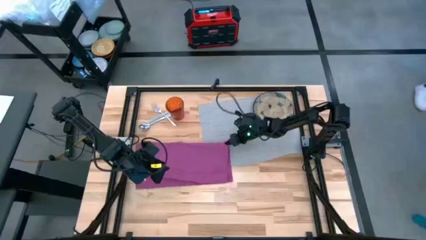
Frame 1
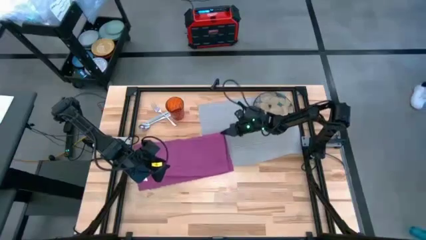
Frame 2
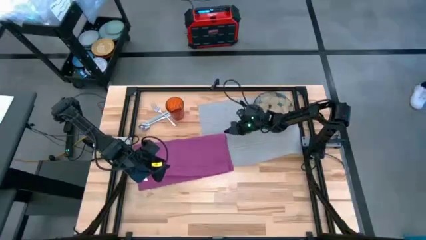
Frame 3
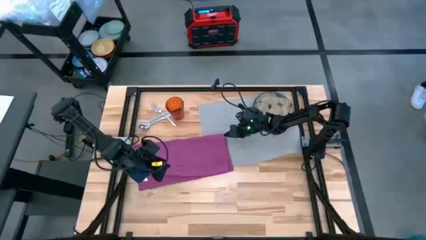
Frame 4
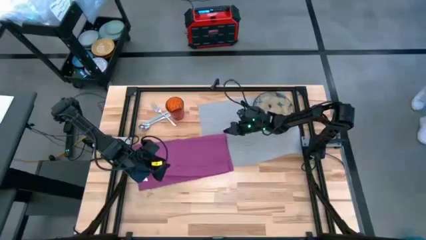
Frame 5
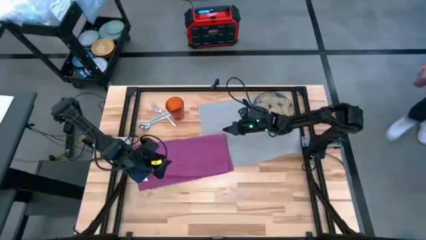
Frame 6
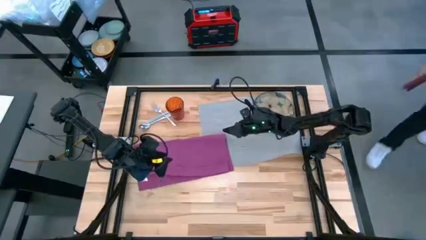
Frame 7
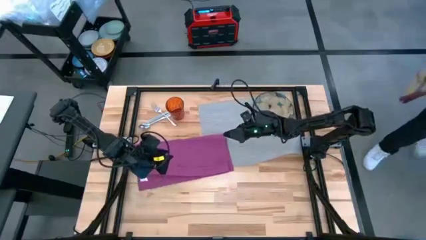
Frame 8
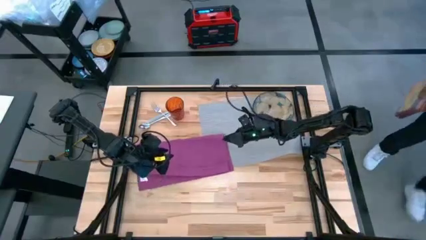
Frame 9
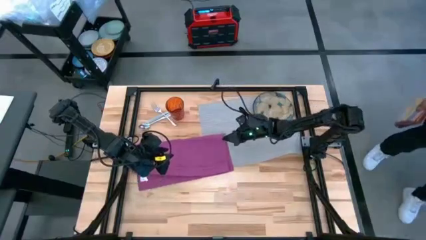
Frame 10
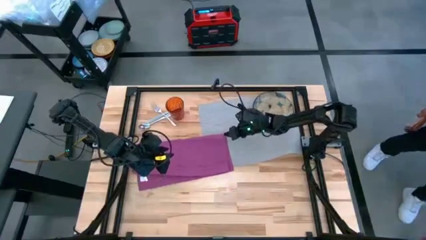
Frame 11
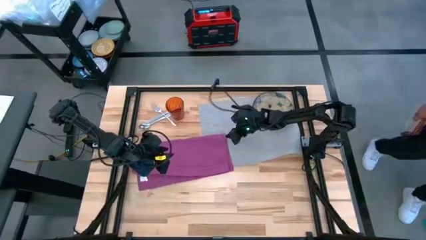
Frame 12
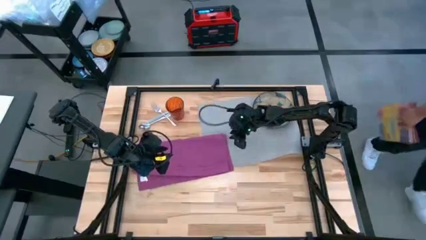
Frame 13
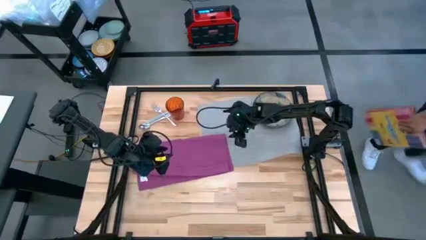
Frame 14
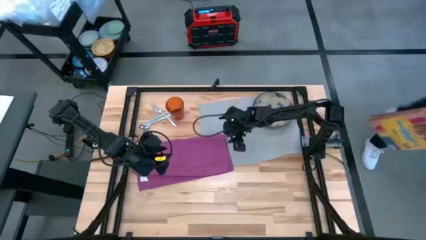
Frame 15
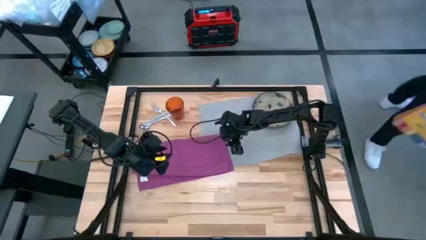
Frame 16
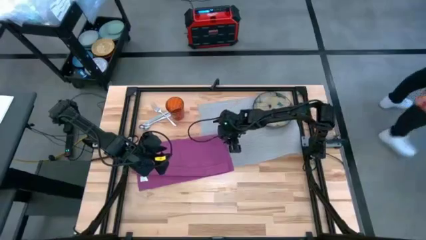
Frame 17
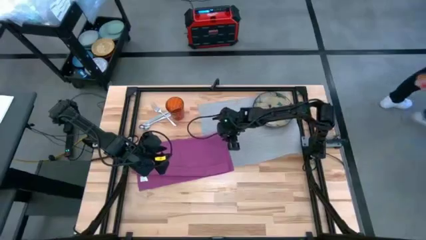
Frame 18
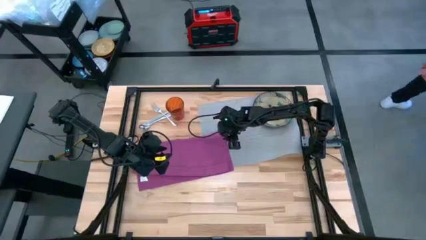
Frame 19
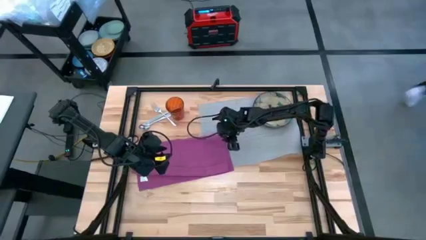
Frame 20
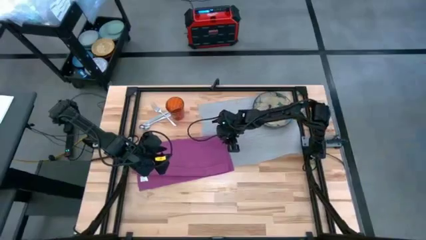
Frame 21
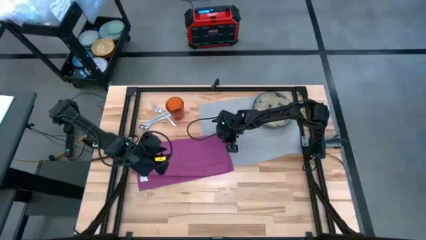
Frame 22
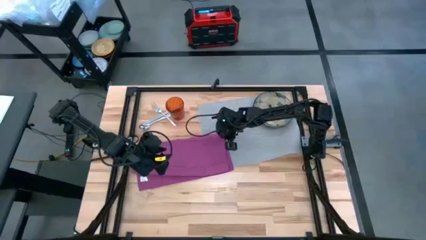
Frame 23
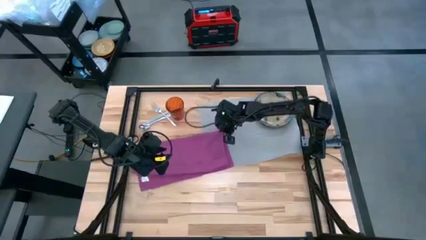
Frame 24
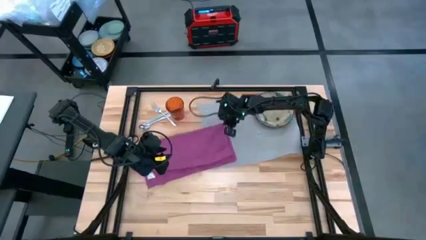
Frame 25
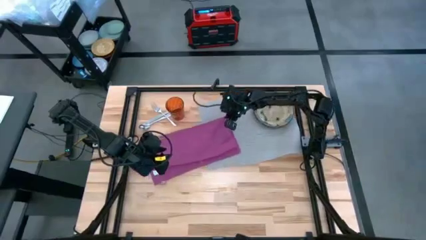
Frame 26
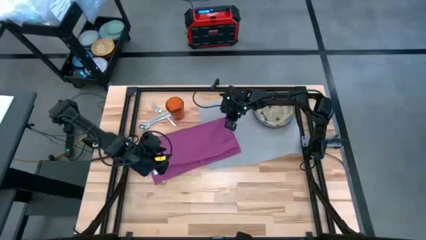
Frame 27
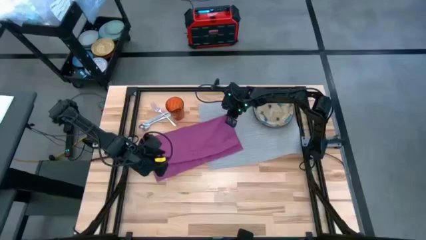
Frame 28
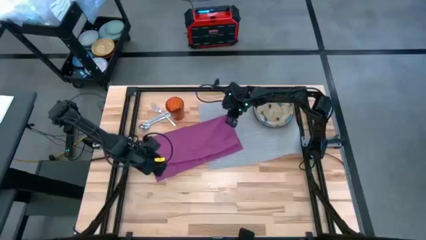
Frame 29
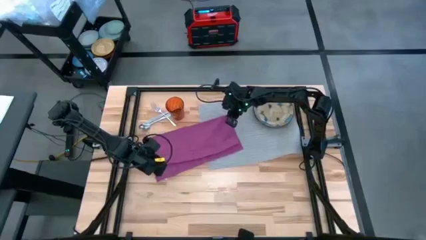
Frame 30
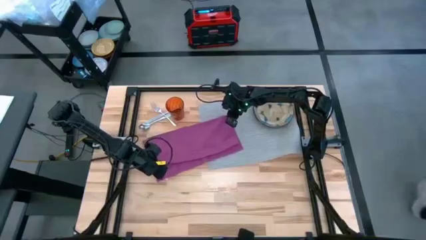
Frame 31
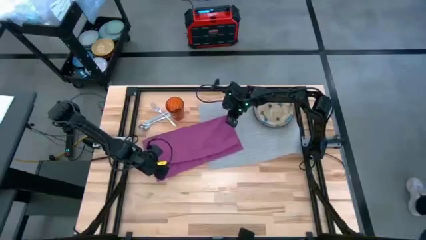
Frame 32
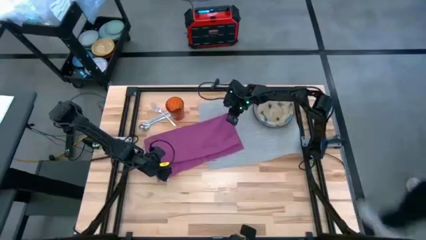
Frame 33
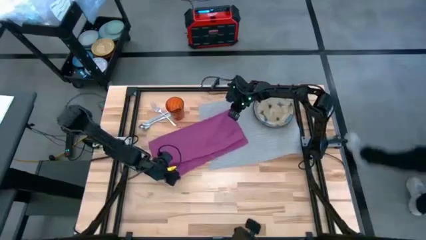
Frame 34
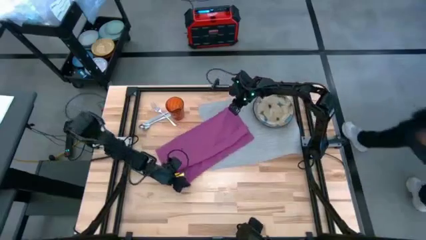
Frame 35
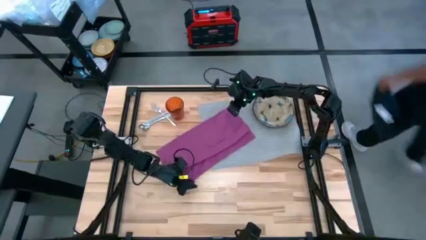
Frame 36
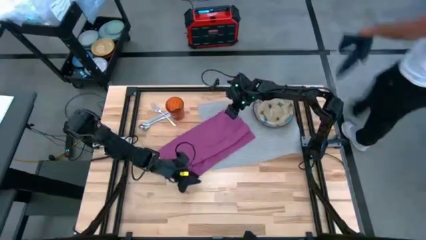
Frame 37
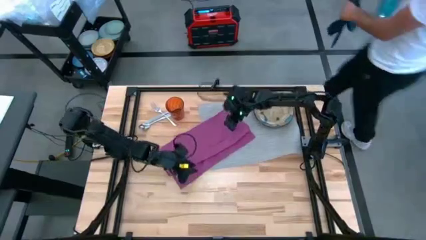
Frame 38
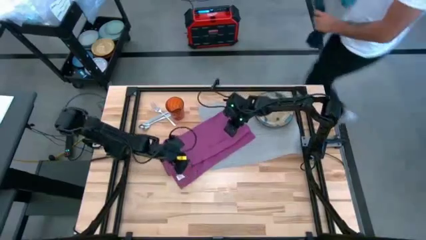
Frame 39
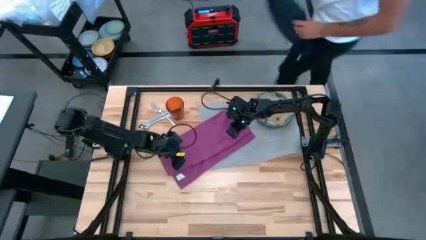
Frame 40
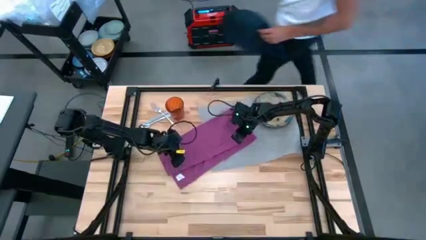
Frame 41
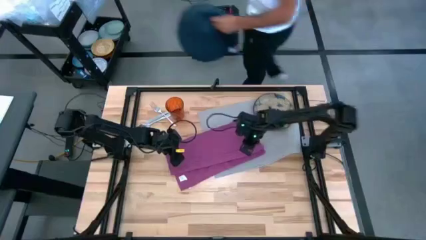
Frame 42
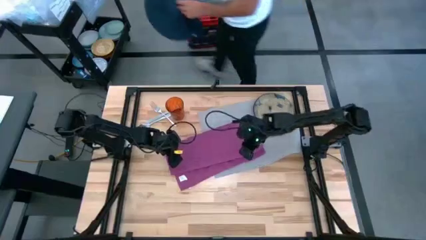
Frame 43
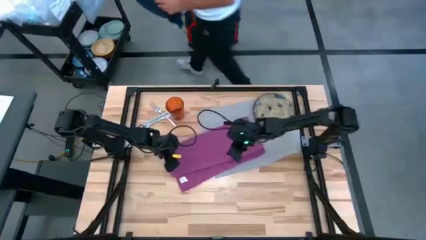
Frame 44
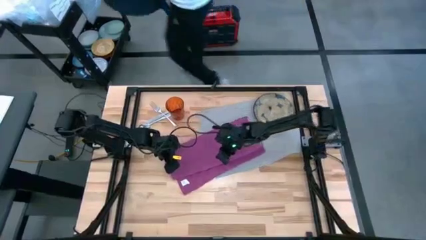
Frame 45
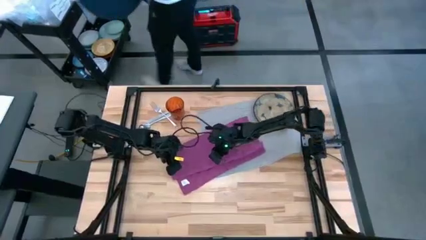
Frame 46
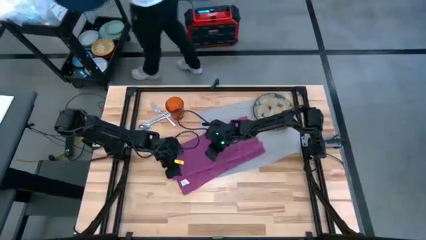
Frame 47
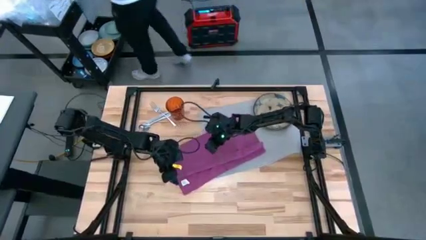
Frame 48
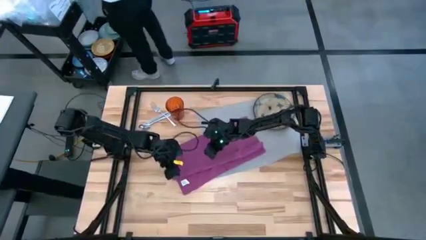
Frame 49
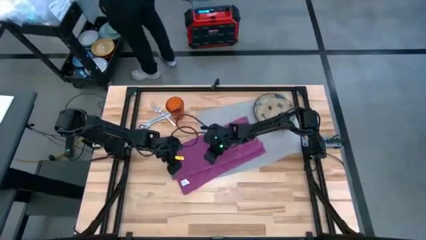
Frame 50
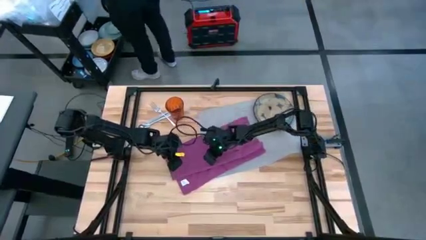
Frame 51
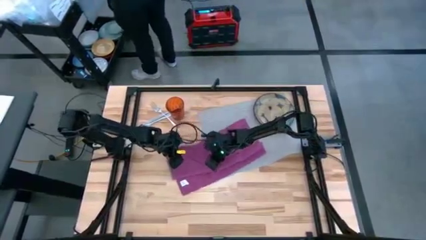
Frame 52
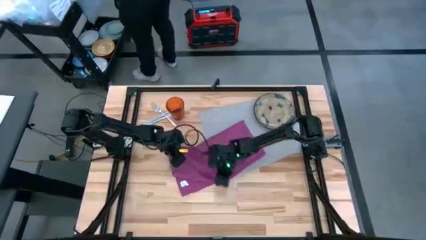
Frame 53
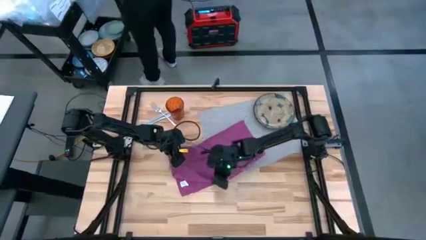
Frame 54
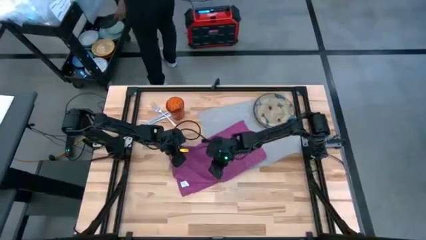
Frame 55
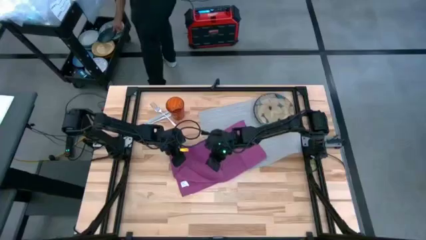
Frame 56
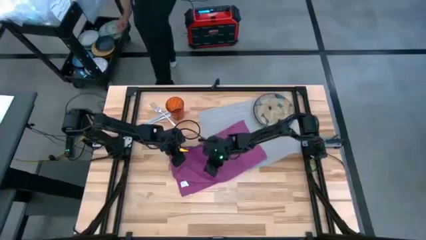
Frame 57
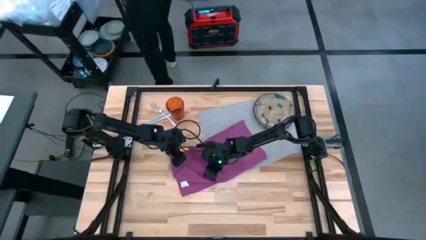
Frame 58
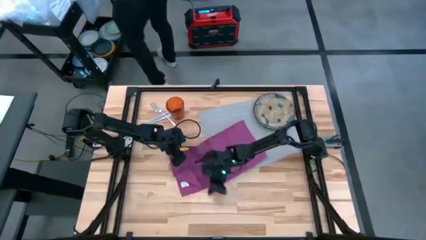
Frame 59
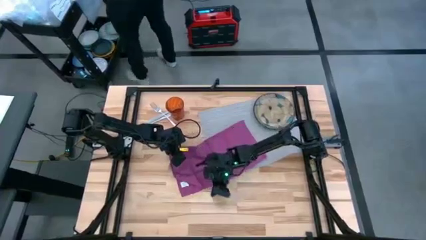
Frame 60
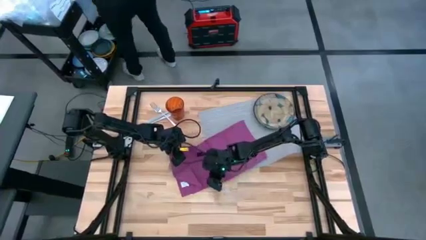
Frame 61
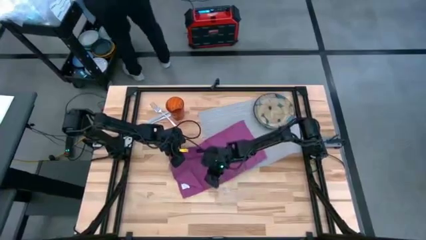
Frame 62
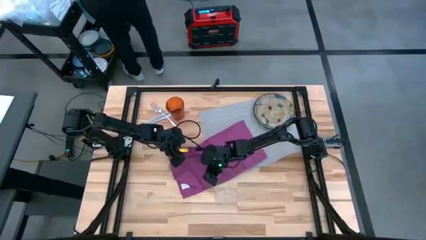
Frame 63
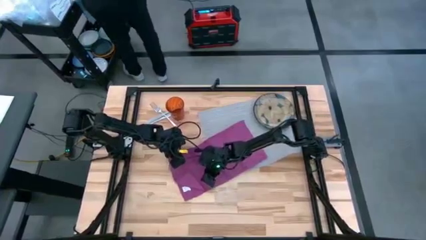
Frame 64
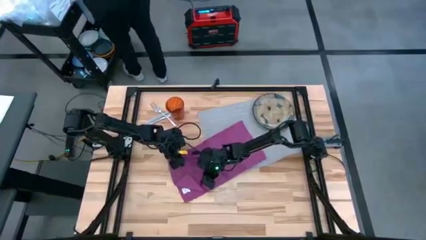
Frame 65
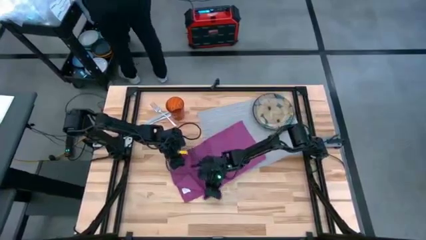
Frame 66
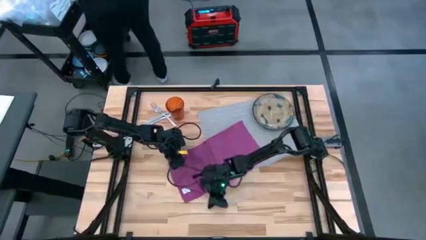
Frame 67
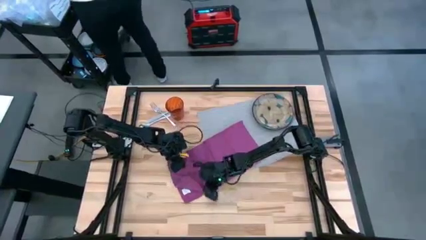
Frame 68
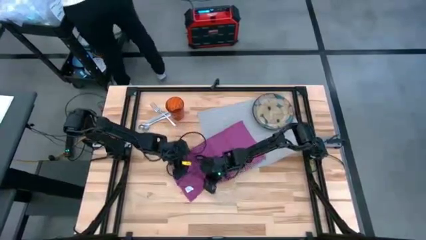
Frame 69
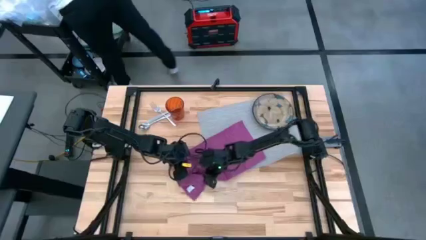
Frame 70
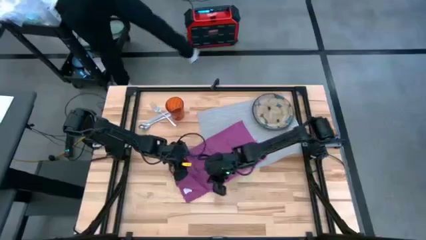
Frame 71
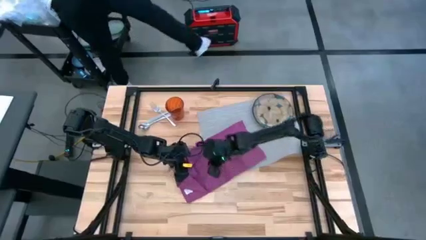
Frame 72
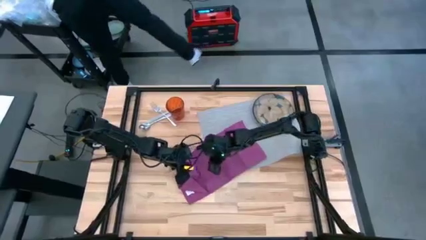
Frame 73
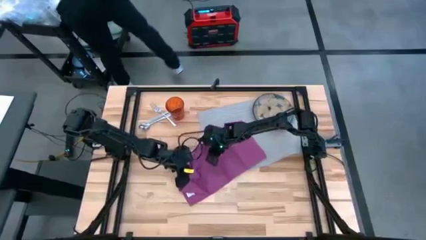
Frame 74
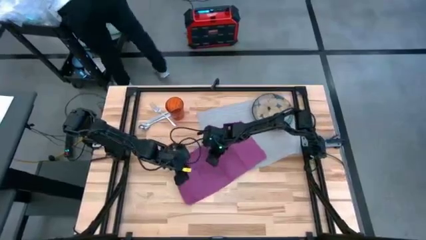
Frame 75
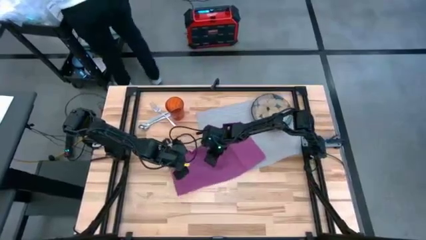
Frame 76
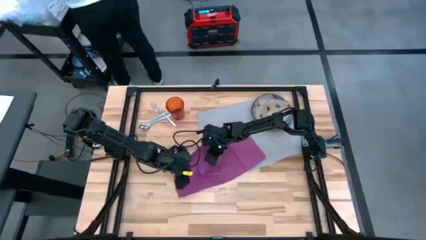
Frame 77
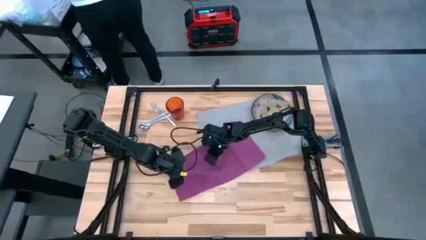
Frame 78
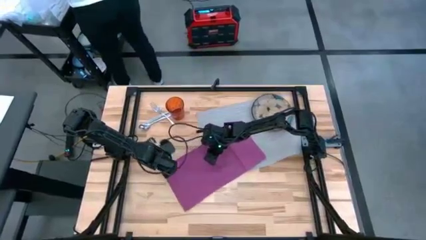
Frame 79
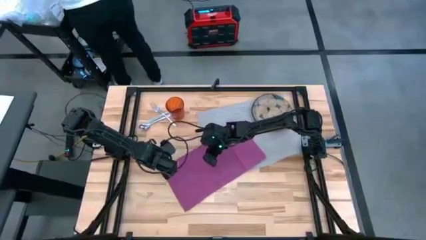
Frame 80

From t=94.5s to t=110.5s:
Task: Set table place
Fold the purple napkin
